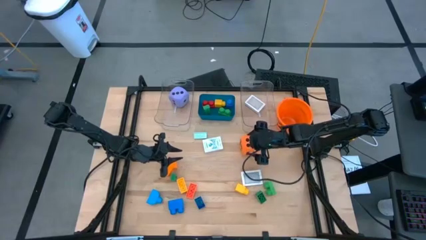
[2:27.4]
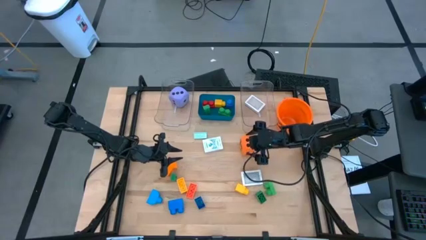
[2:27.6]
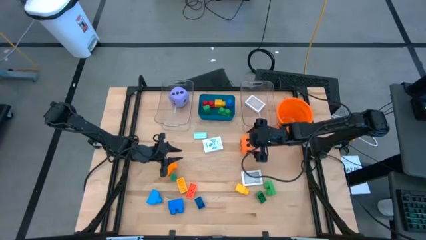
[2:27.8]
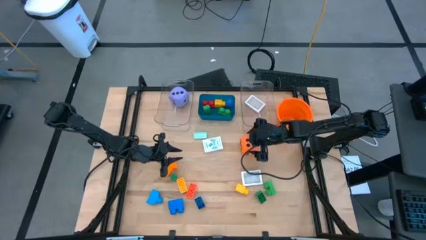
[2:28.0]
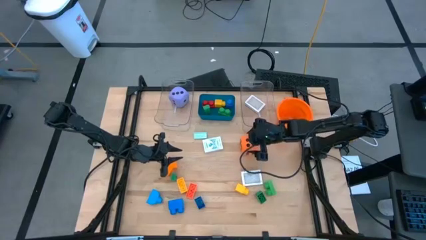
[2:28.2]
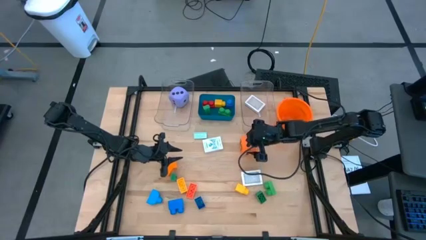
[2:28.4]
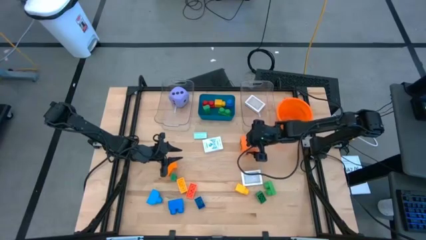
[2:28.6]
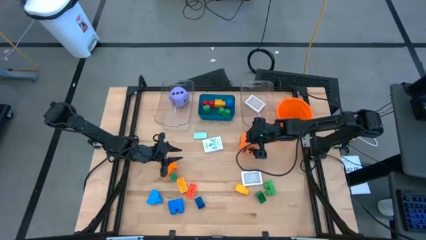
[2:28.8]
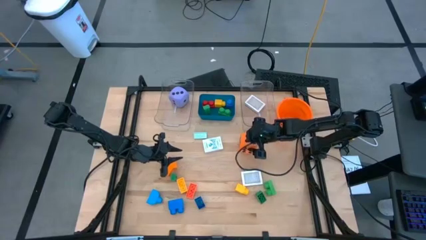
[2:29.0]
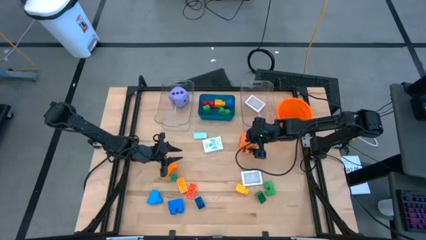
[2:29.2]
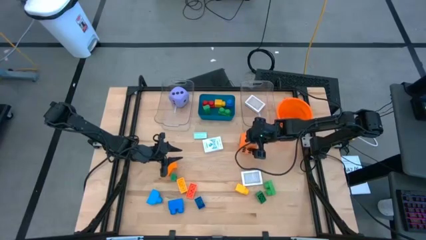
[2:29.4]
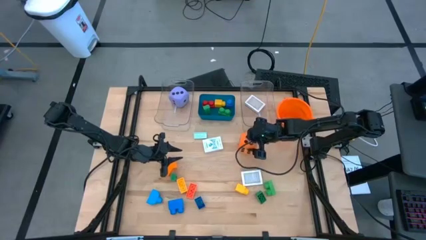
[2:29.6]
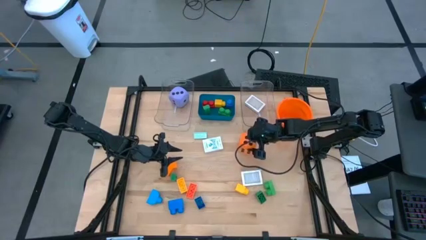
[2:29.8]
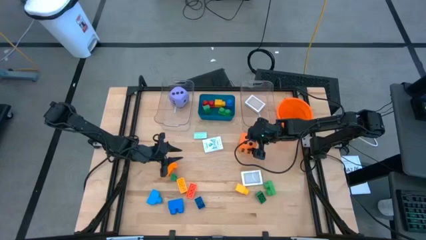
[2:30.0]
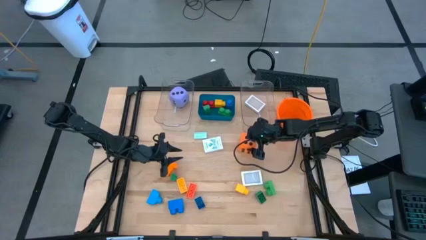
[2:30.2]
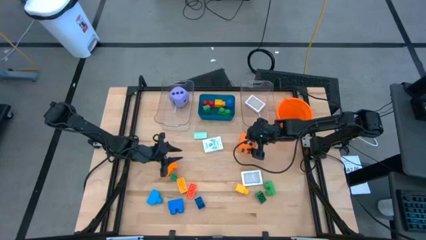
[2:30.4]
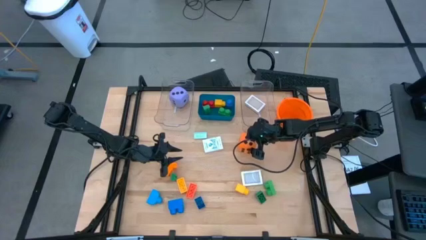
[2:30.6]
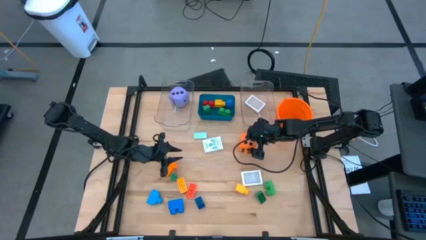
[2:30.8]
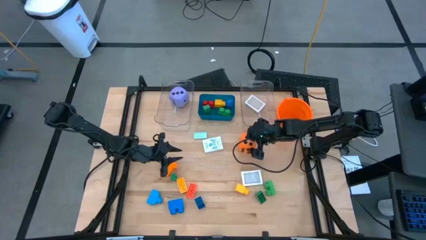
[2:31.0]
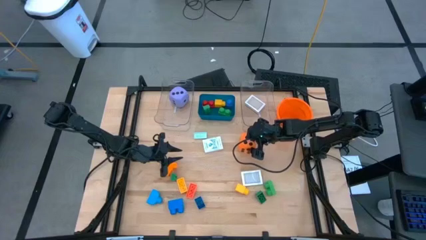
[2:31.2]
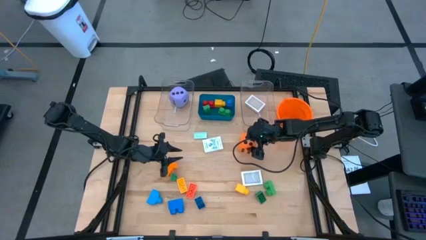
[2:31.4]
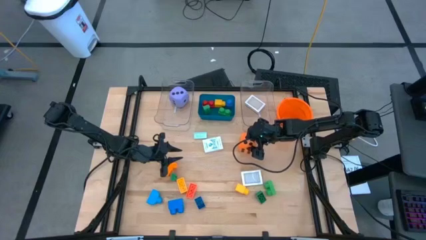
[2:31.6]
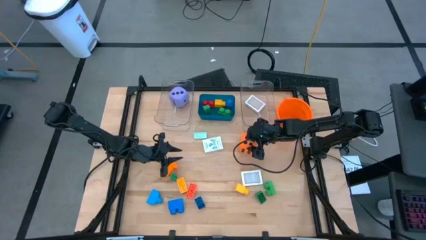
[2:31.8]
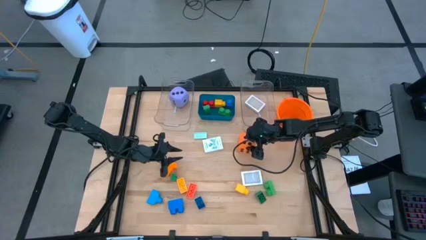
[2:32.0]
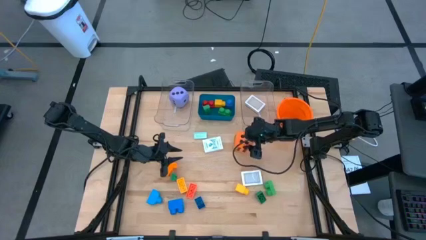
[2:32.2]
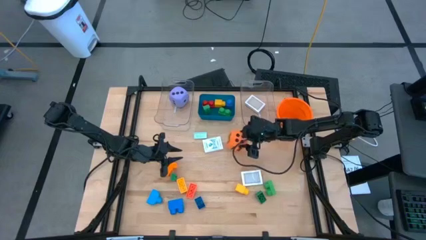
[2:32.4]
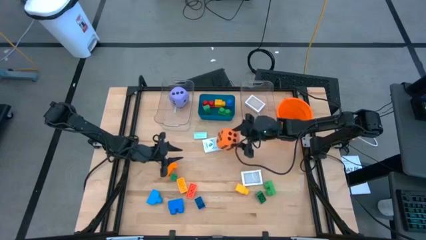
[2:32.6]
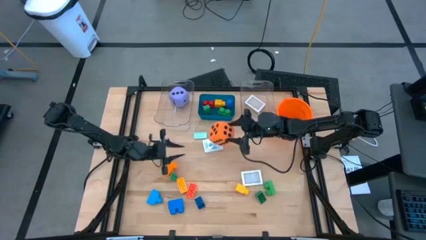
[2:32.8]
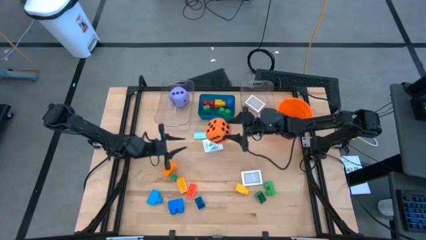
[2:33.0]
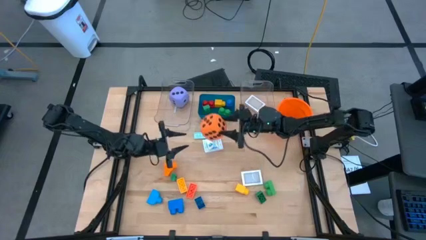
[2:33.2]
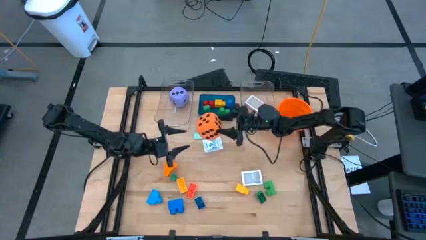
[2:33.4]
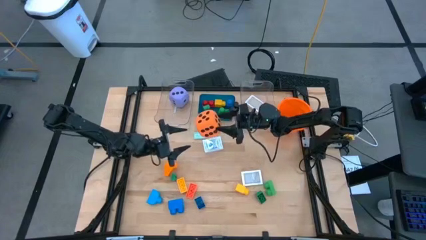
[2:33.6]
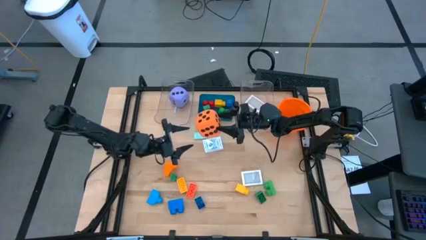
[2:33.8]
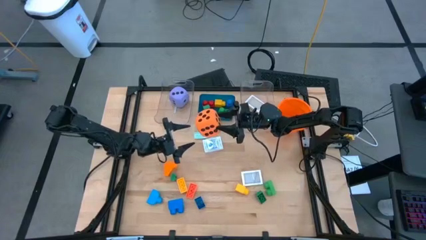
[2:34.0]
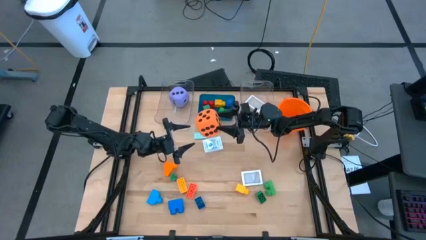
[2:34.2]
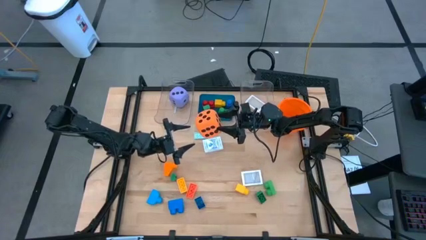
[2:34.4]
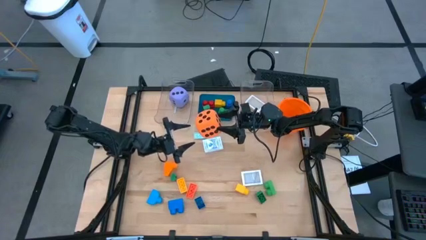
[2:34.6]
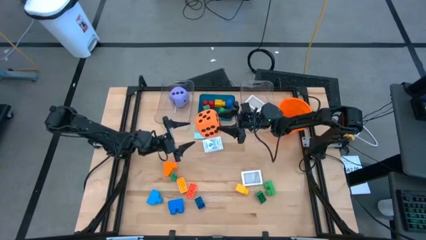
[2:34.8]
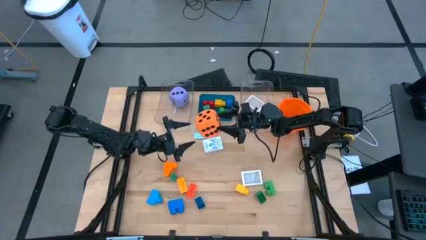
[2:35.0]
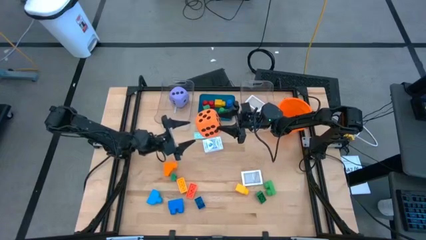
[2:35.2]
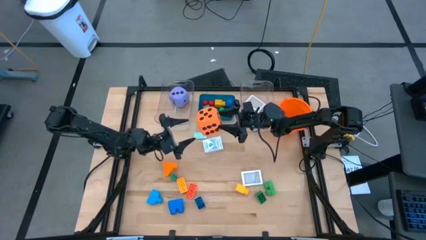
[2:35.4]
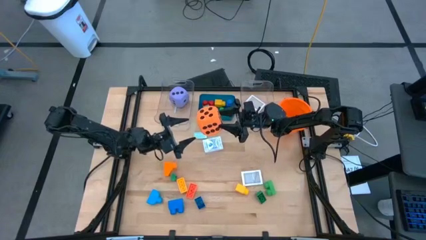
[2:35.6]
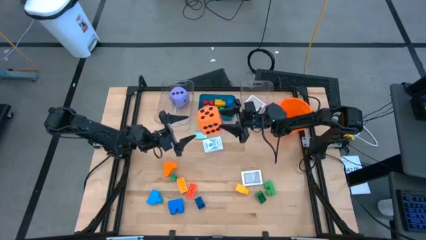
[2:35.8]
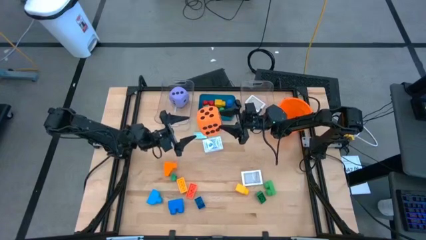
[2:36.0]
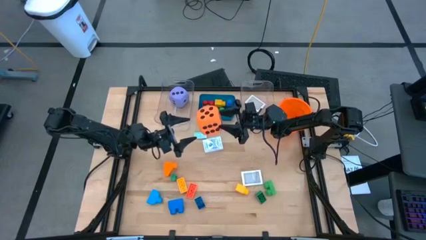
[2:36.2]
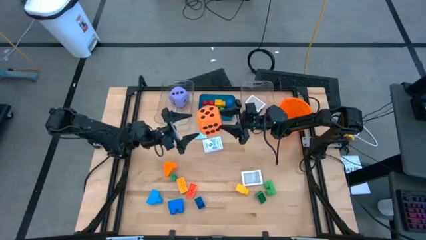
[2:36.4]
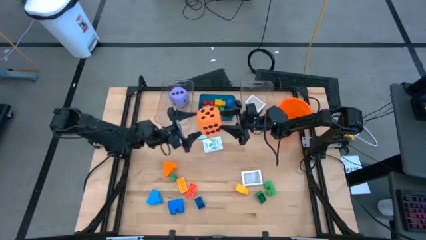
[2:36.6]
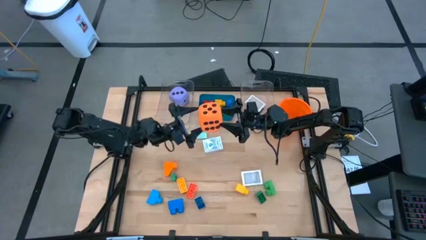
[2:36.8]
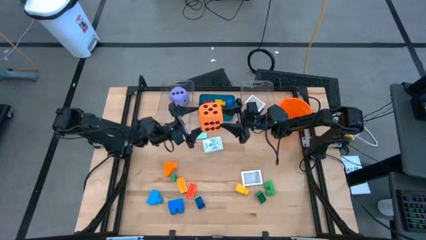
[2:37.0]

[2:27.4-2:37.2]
Task: Pick & Place Toys
Put the orange dice into the left transparent bin

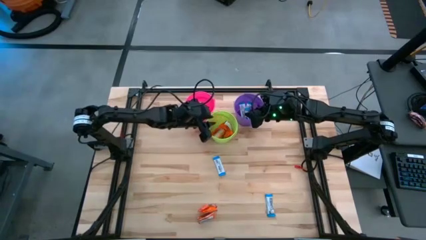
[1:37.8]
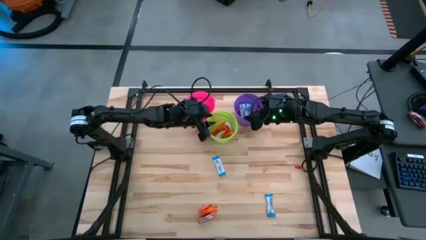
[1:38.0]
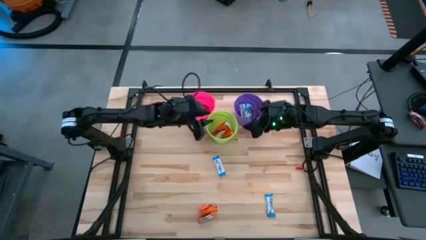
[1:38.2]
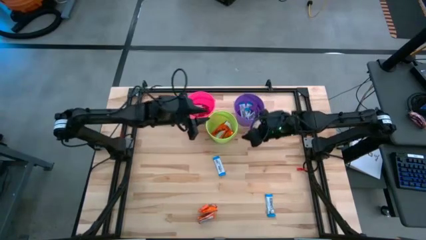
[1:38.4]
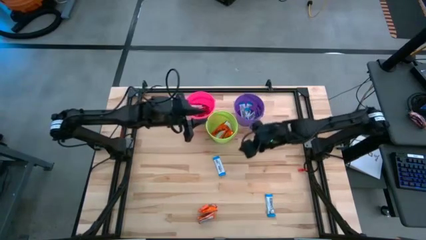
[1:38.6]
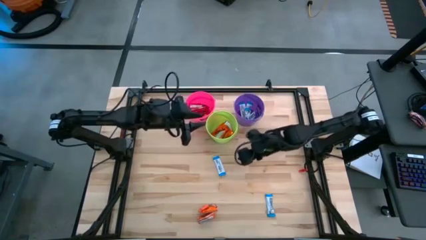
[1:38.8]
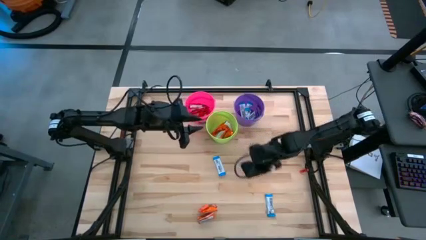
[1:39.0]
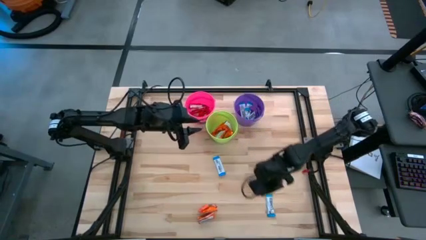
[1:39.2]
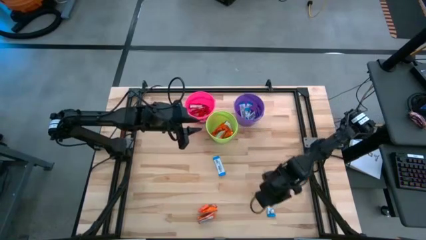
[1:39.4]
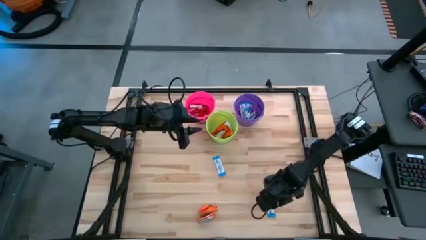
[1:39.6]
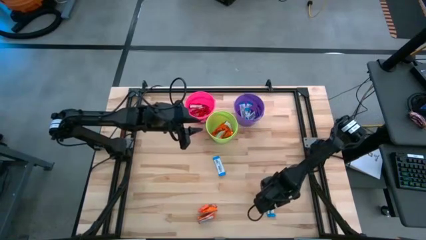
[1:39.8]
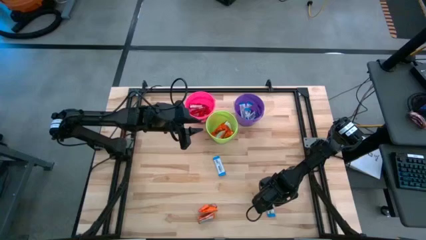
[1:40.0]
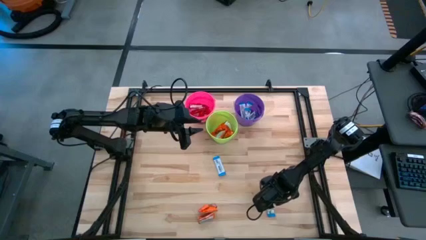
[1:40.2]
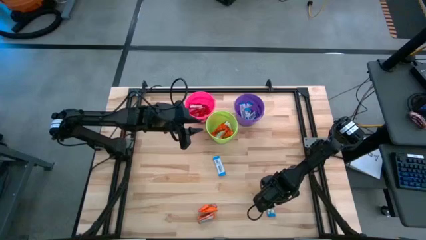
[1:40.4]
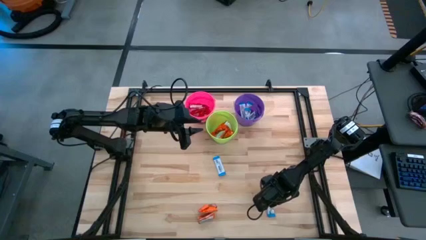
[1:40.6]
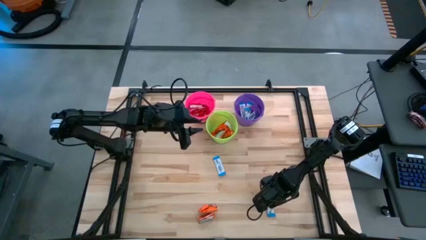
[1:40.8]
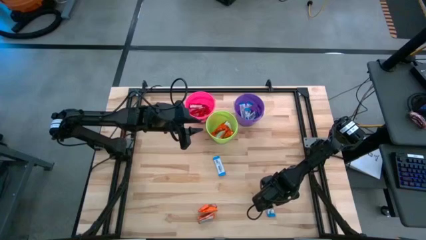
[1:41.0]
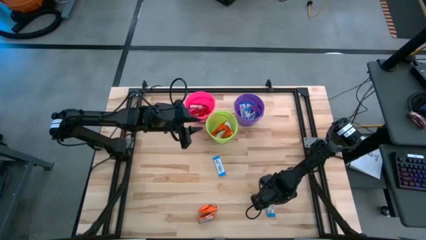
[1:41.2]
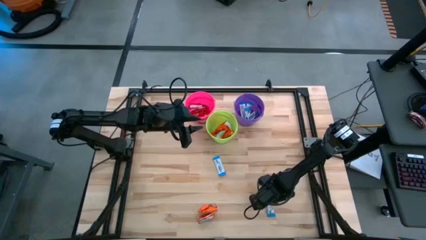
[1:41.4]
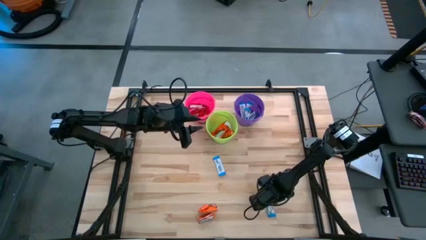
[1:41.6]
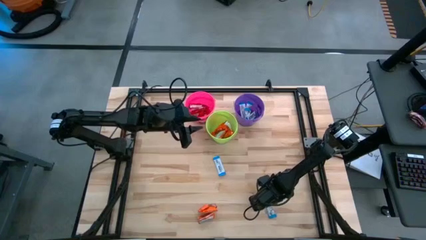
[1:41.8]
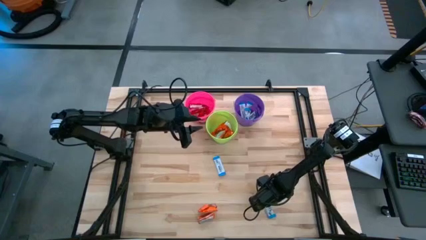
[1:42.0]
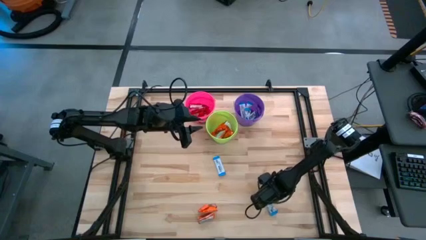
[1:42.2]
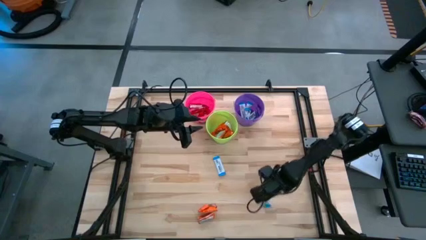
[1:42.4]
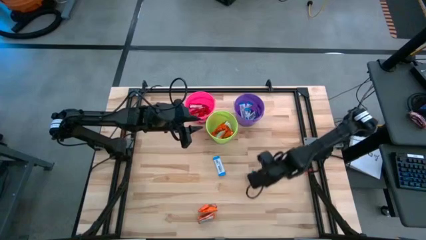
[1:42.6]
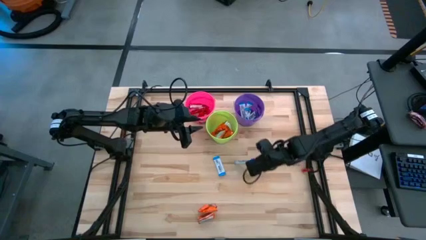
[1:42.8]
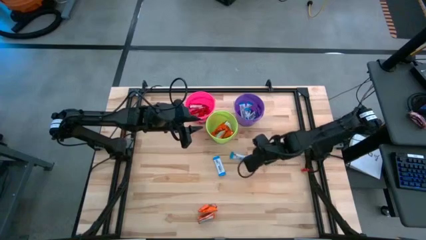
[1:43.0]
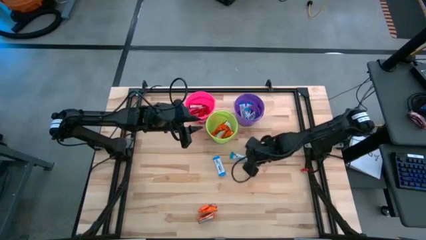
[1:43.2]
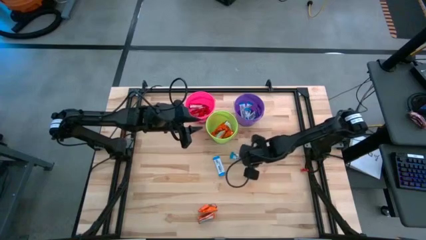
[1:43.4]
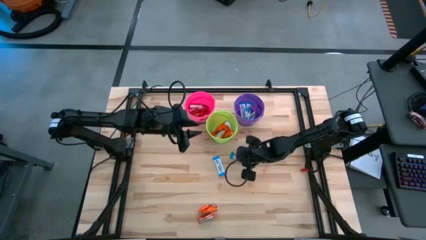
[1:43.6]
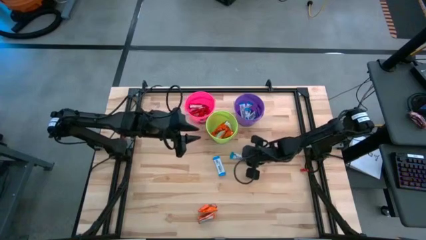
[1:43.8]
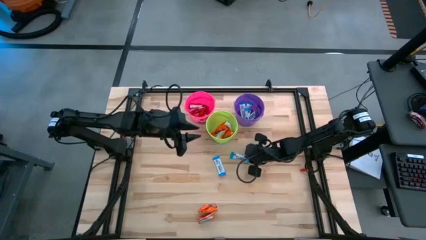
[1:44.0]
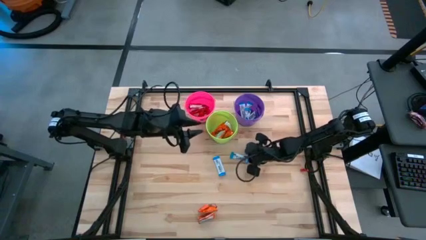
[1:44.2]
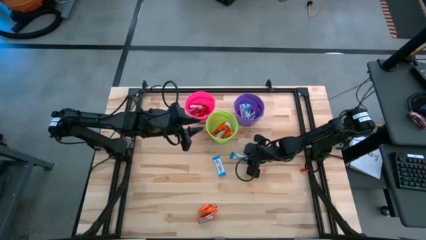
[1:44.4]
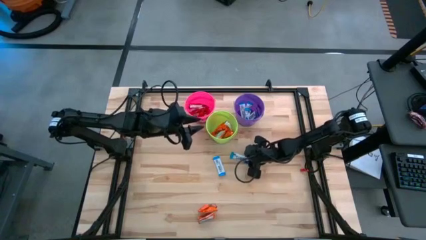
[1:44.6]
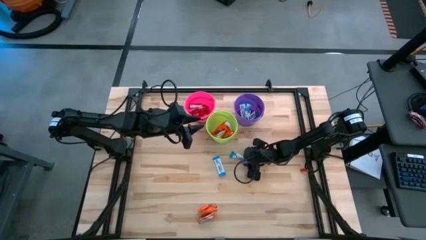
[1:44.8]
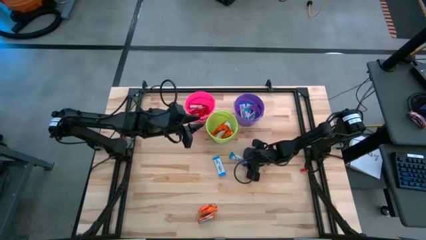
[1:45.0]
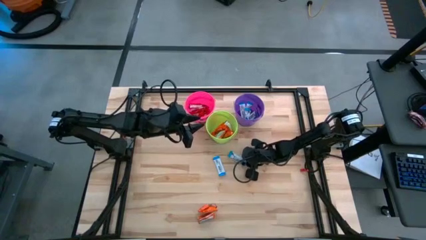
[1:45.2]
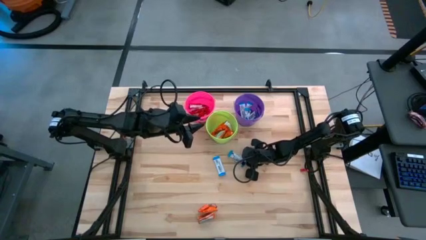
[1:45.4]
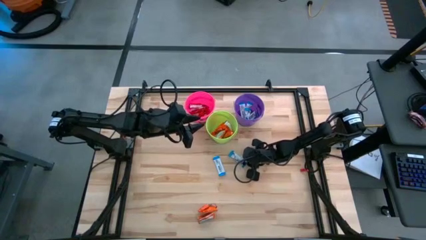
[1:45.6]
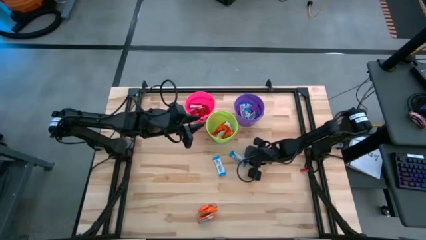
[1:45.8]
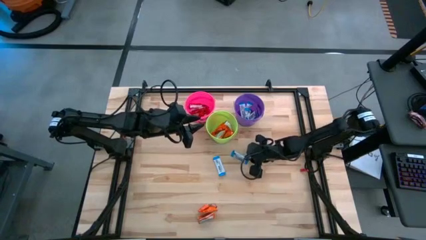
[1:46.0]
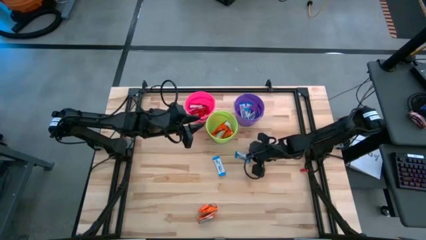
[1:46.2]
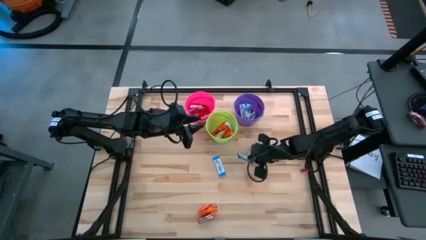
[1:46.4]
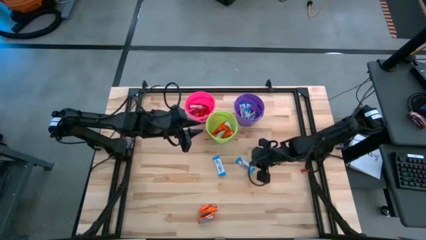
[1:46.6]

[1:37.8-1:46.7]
Task: Sort candy
Put the blue candy into the violet bin
